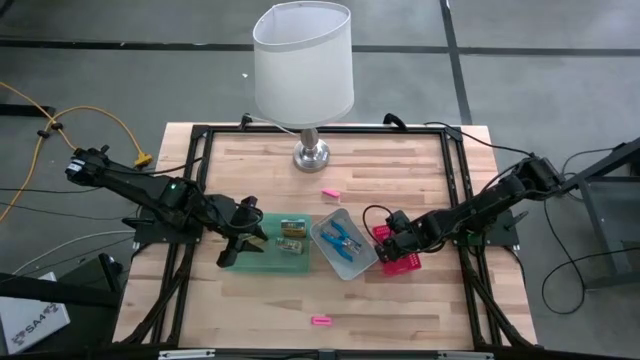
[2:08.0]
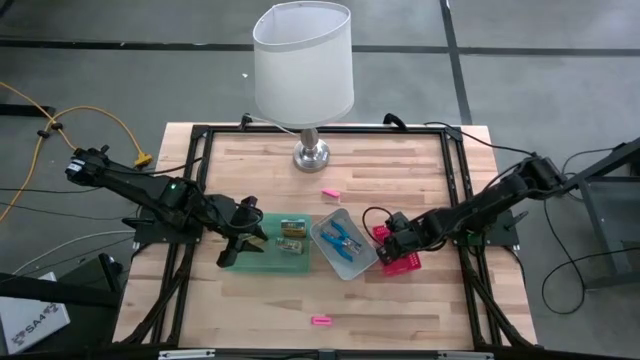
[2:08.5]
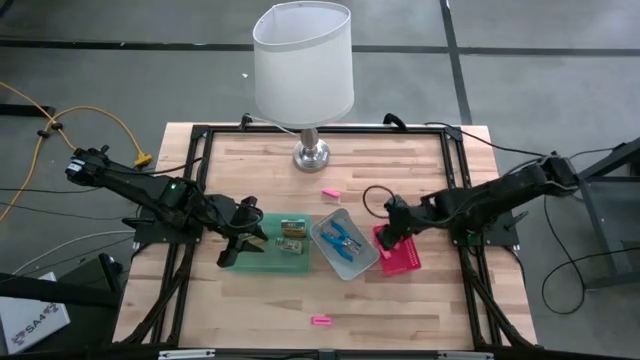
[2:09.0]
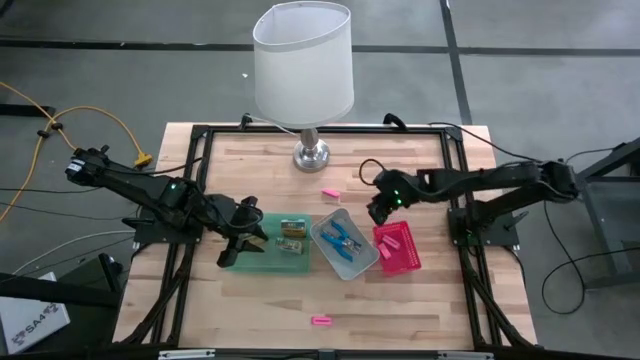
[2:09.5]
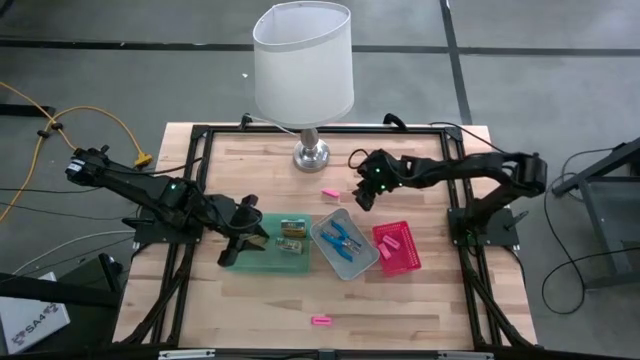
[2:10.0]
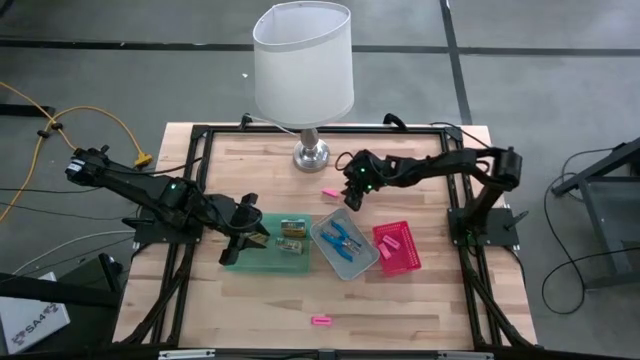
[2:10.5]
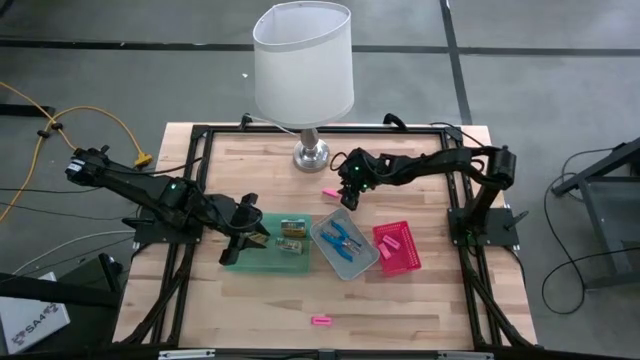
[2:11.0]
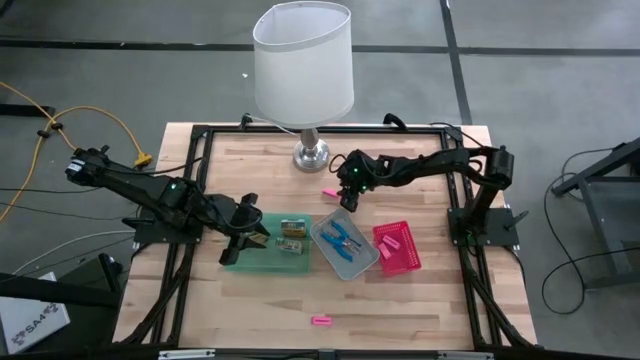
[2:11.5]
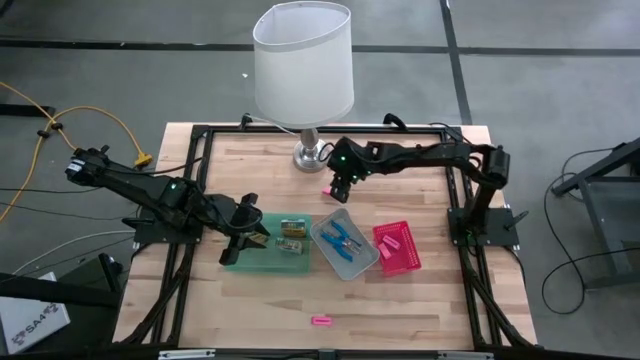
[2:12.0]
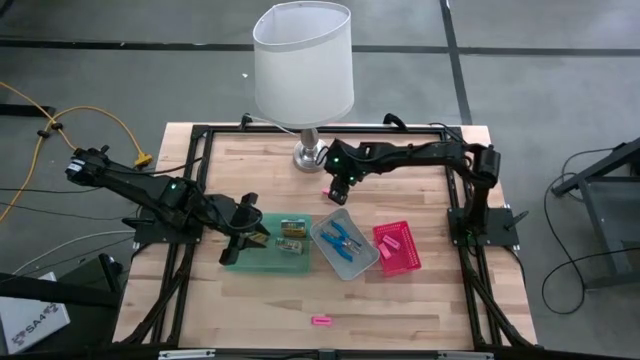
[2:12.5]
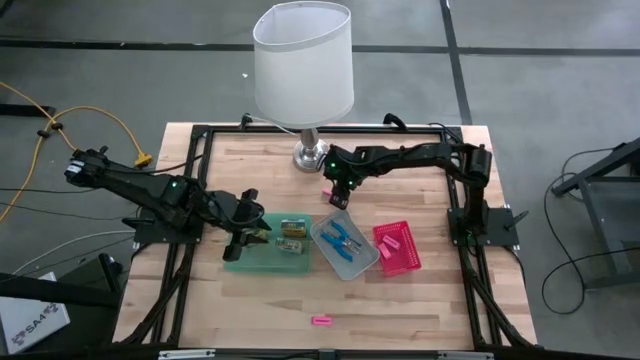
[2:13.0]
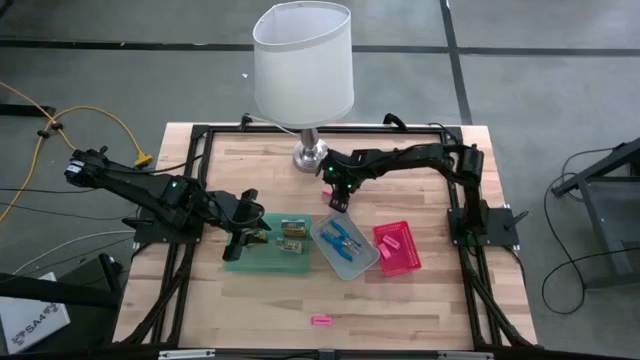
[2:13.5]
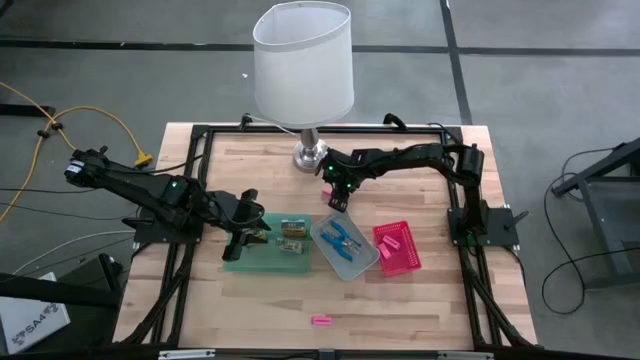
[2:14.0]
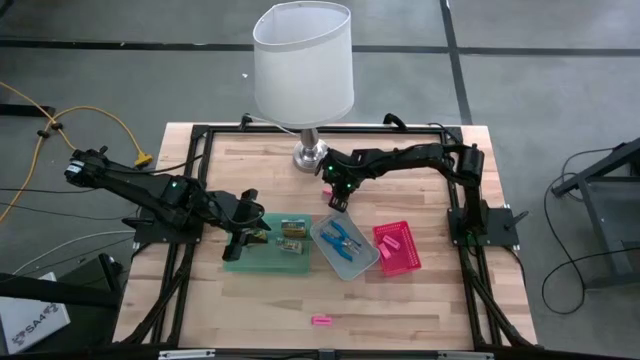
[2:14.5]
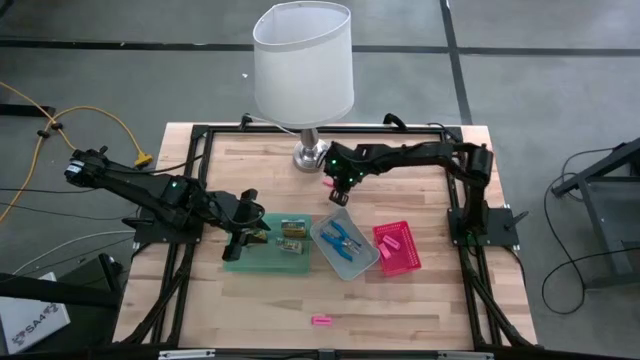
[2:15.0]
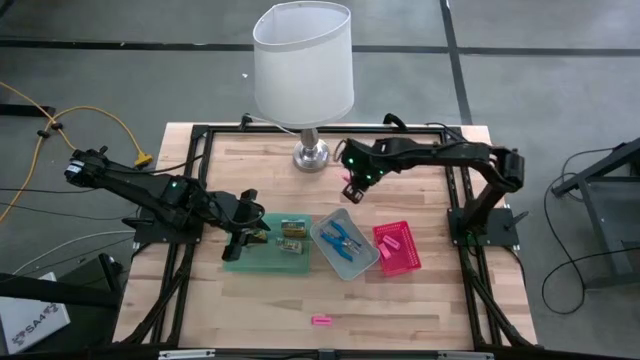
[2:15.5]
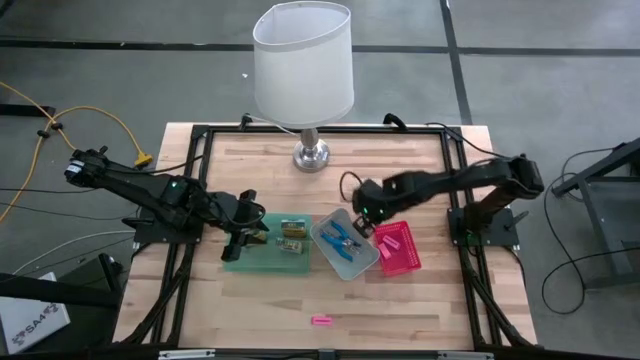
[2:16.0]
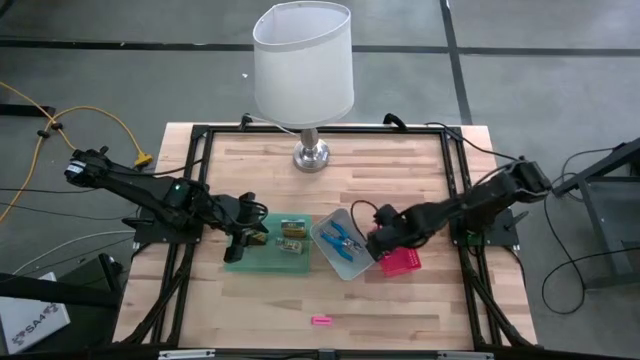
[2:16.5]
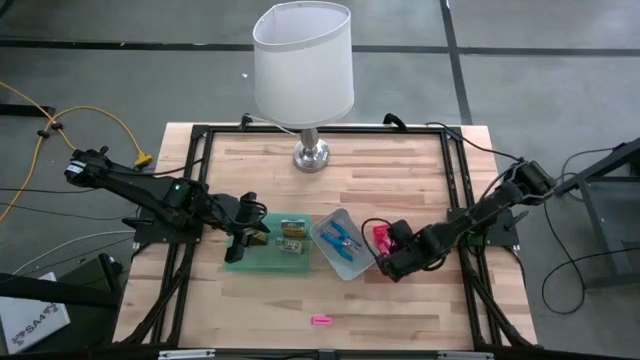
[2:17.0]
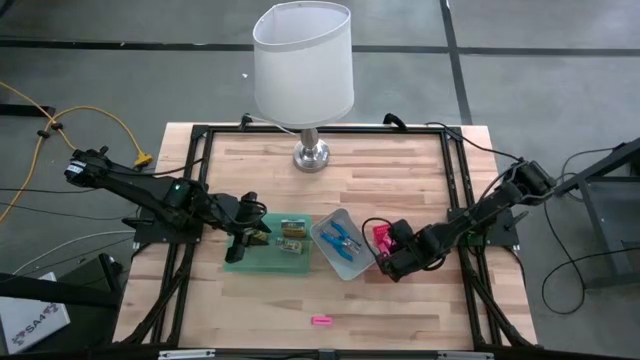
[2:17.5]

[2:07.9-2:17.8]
Task: Pick & Place School Supplies
Put the pink eraser into the red bin

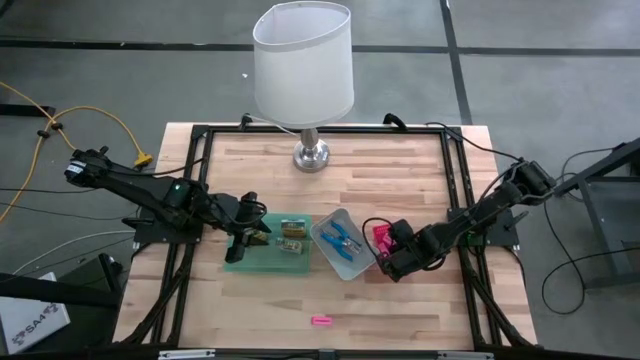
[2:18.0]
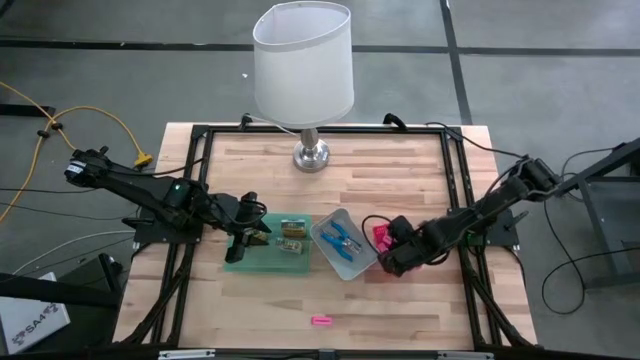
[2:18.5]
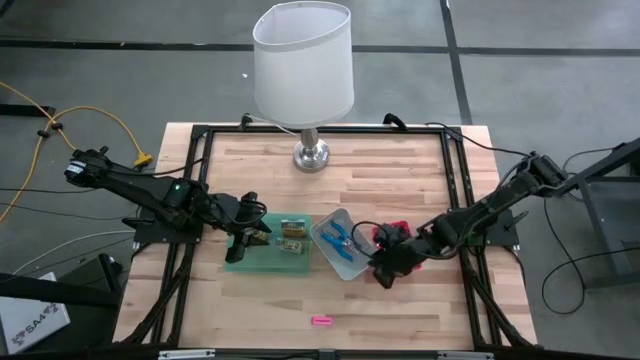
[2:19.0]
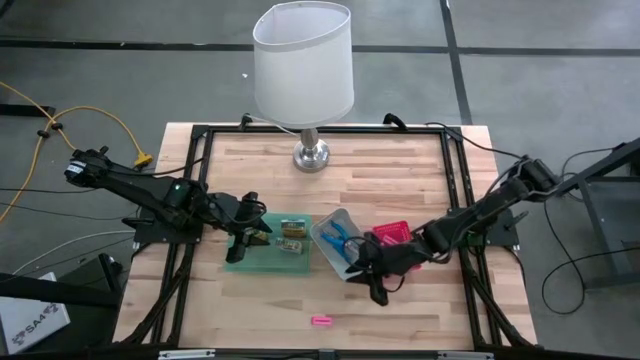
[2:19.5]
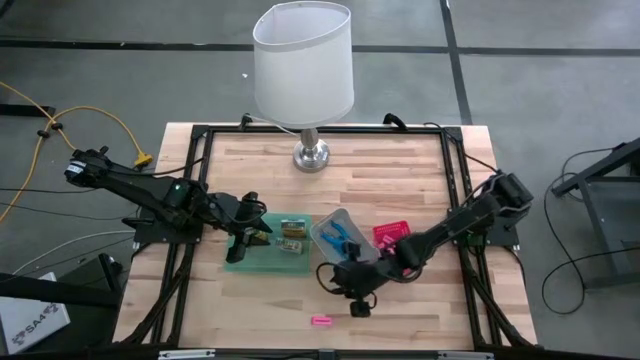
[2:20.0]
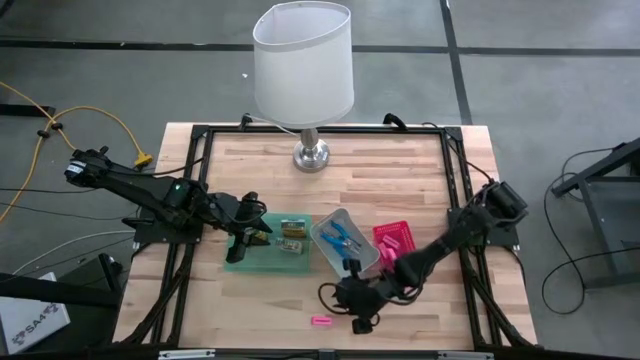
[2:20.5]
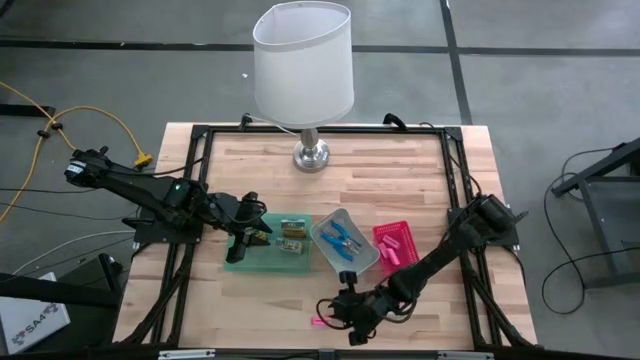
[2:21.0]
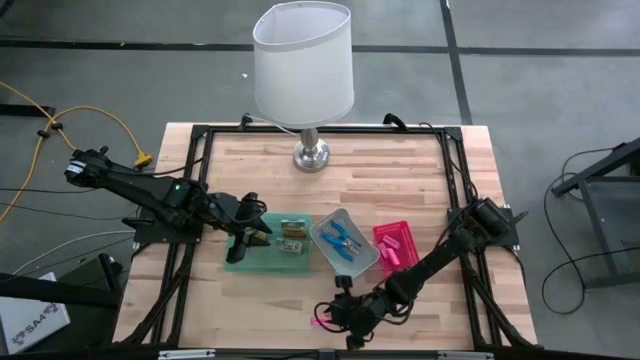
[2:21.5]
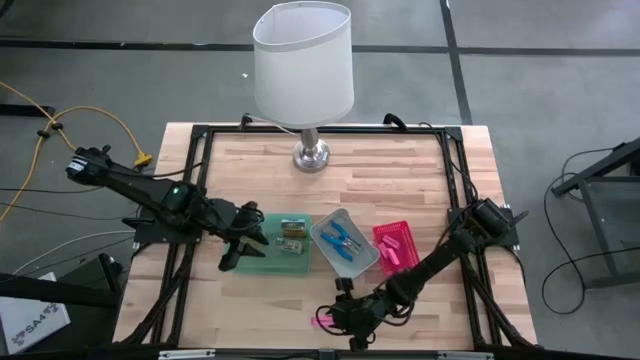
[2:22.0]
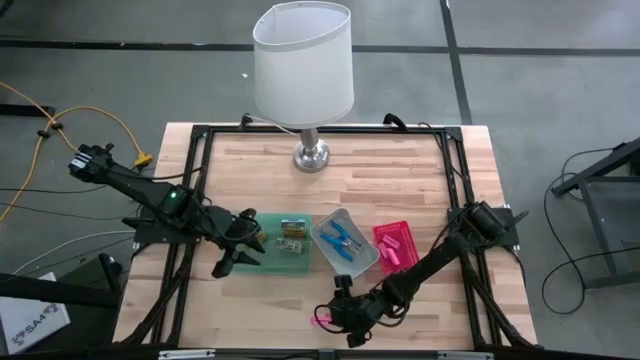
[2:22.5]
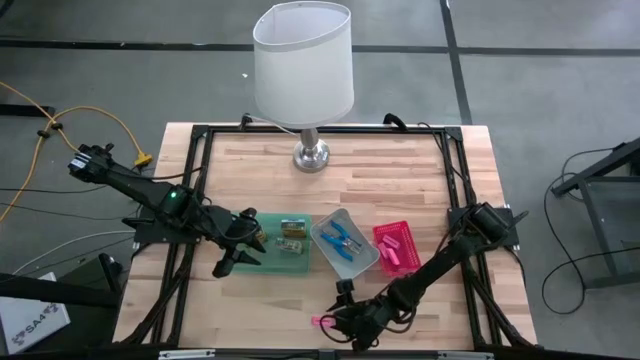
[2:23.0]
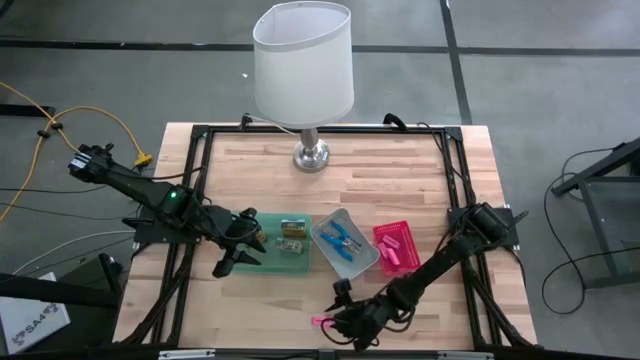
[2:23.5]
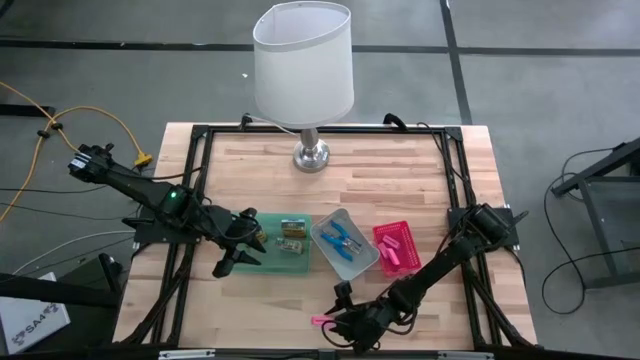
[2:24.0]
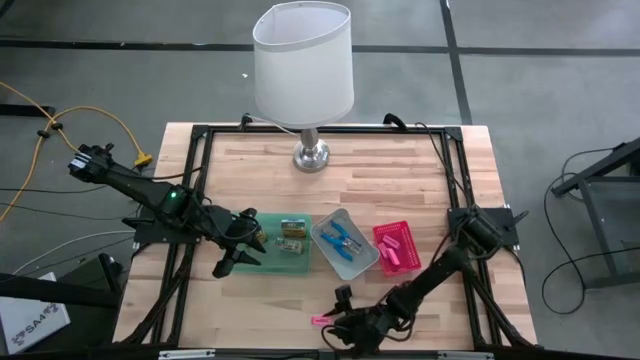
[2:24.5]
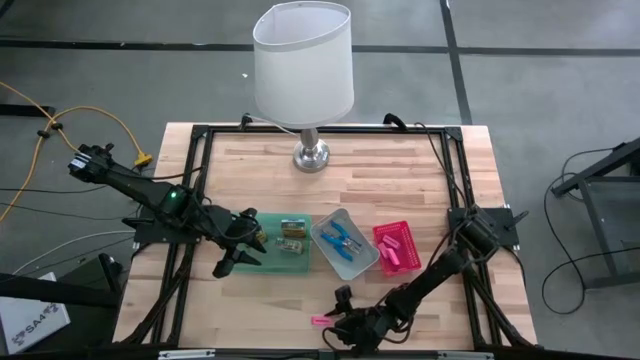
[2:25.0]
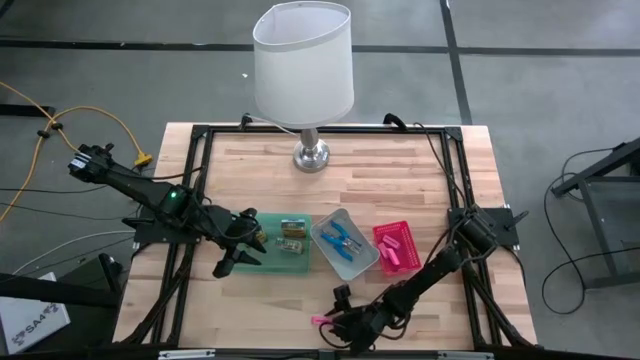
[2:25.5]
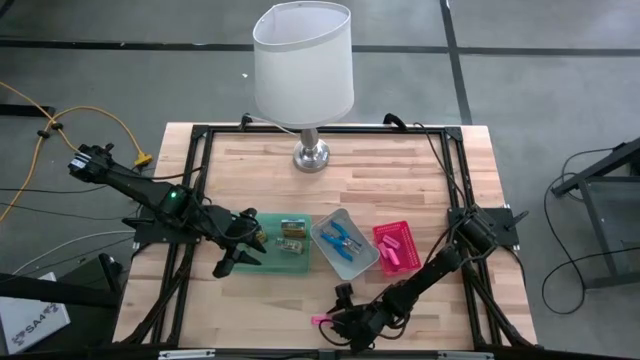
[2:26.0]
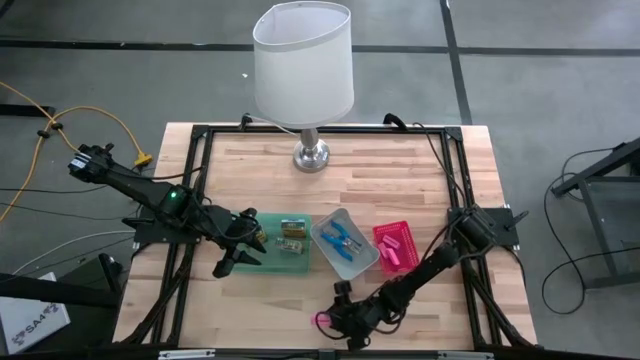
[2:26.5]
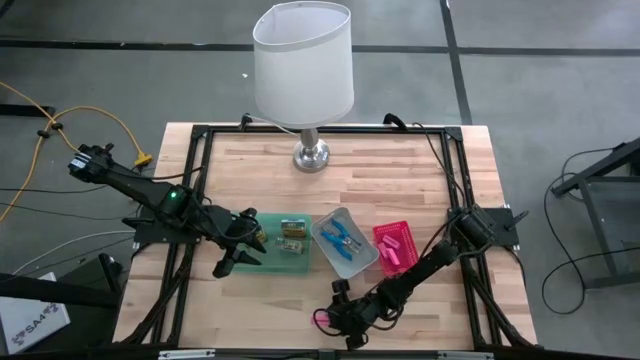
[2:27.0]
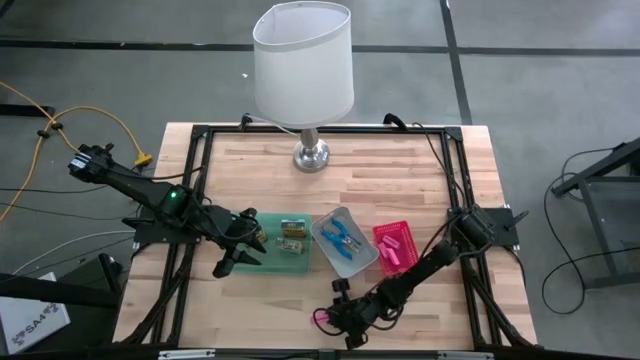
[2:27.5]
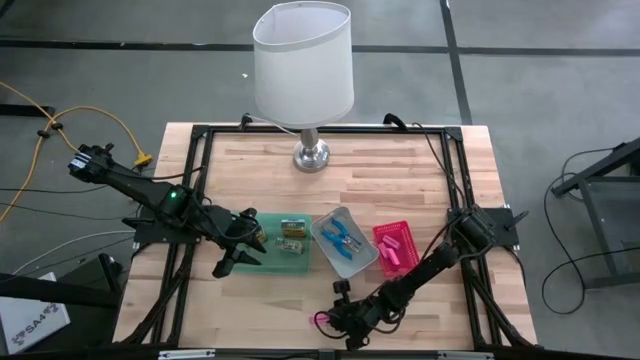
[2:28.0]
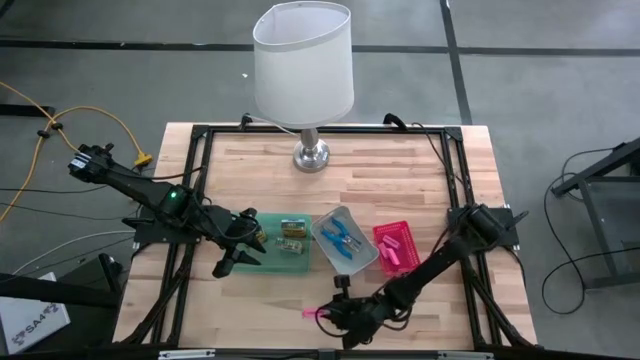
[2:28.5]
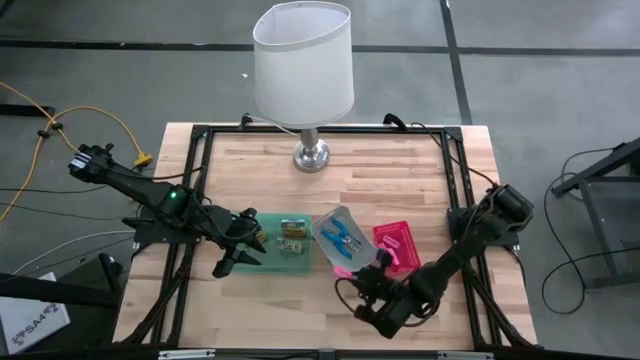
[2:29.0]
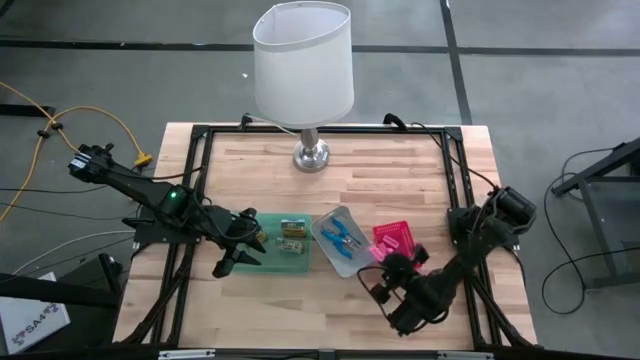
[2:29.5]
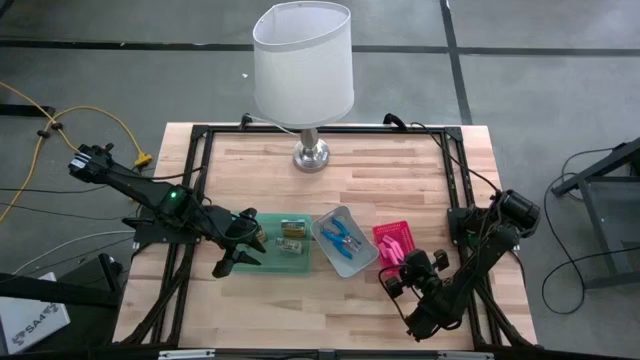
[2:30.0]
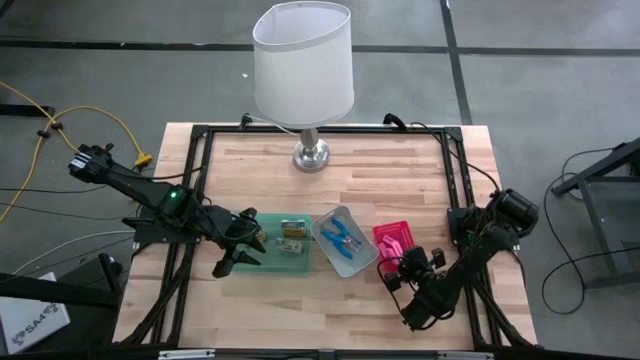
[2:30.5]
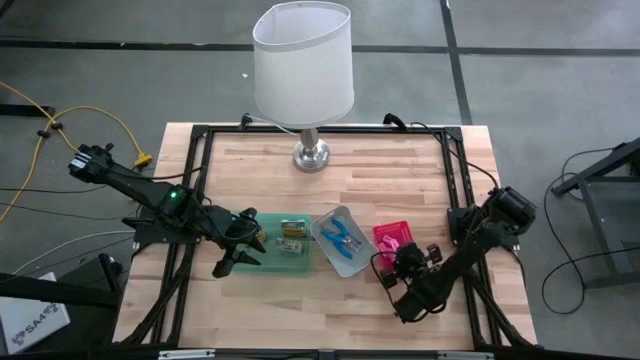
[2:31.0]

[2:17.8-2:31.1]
Put the pink eraser into the red bin
